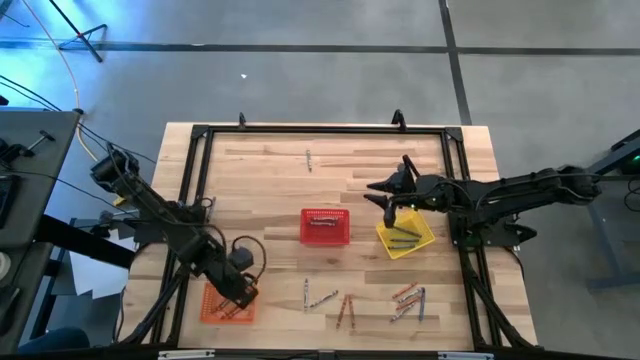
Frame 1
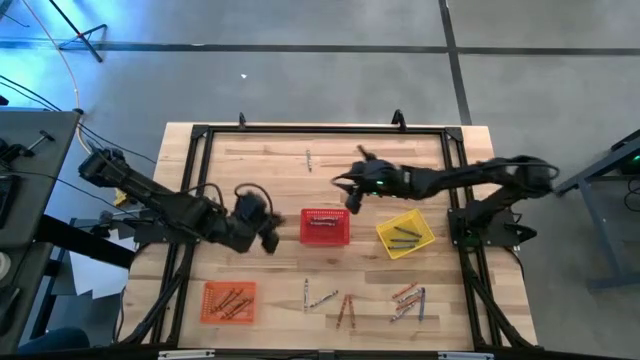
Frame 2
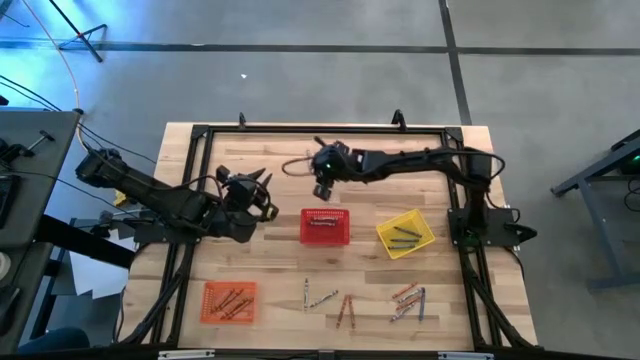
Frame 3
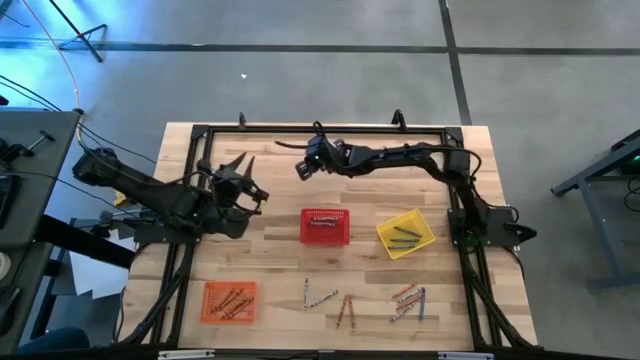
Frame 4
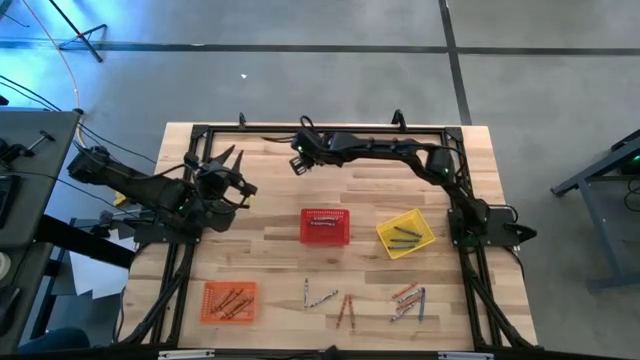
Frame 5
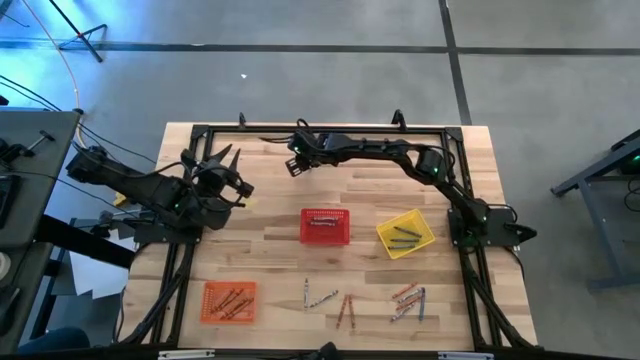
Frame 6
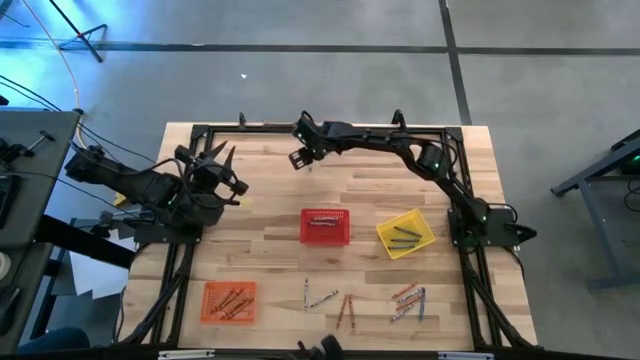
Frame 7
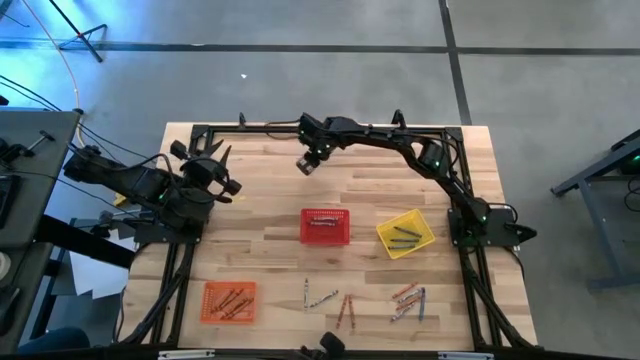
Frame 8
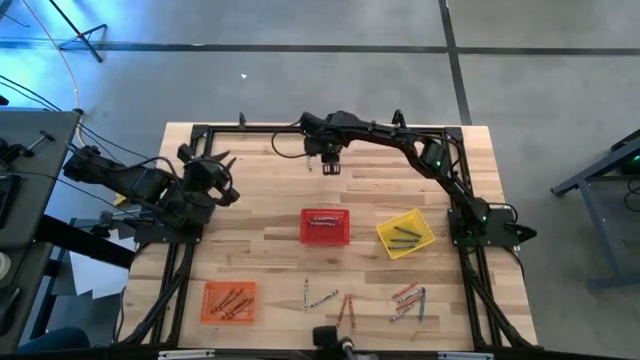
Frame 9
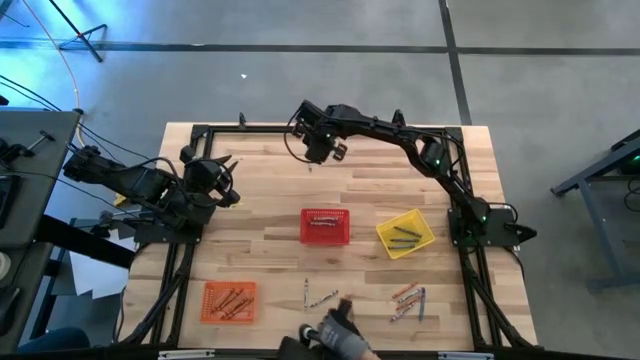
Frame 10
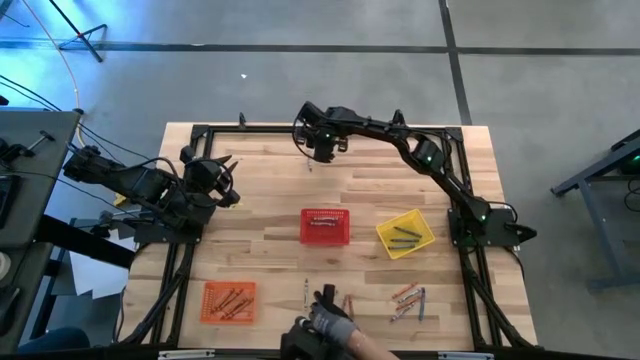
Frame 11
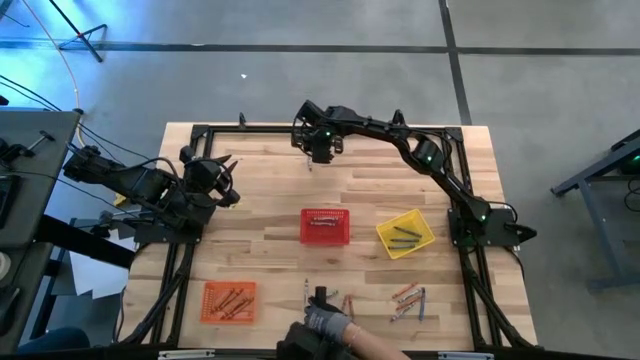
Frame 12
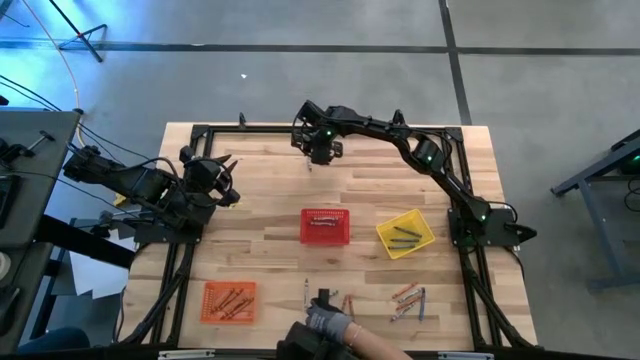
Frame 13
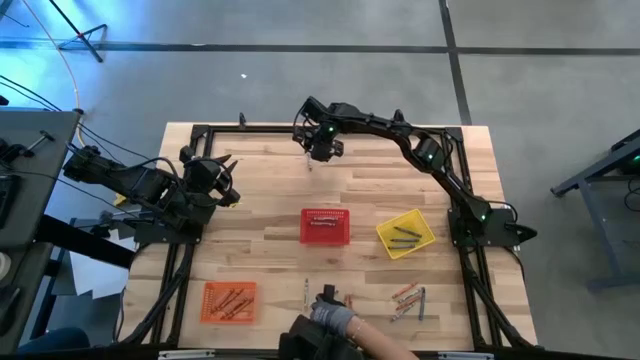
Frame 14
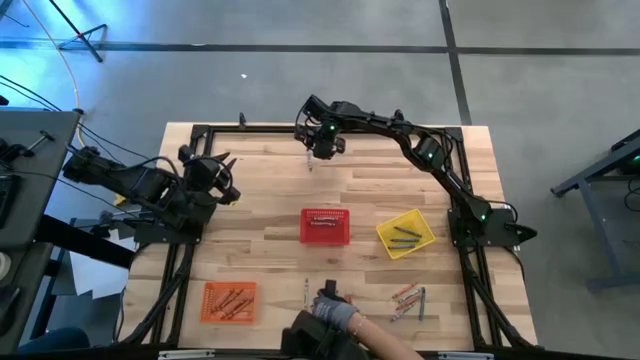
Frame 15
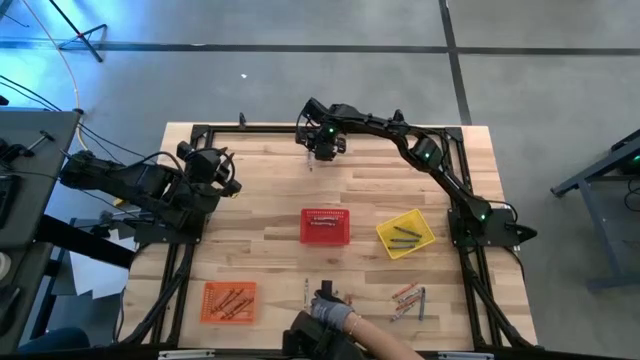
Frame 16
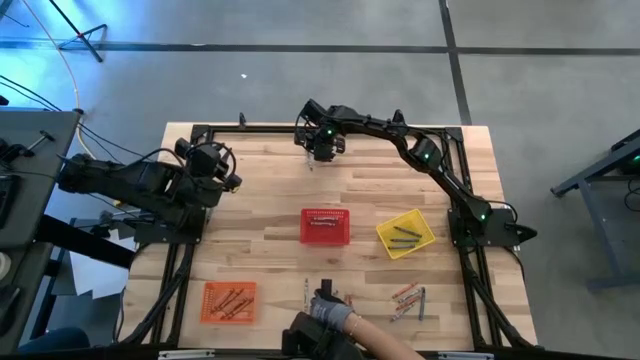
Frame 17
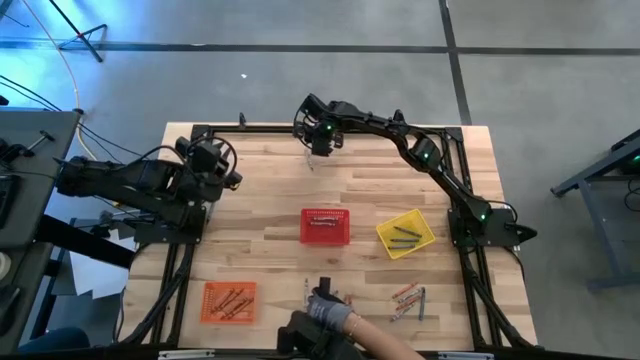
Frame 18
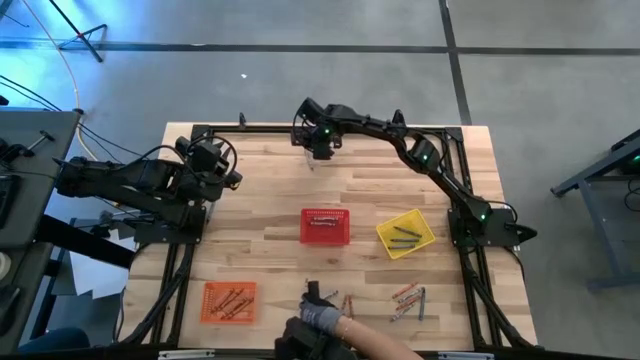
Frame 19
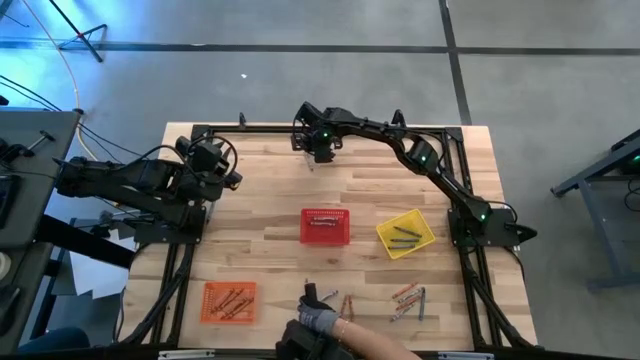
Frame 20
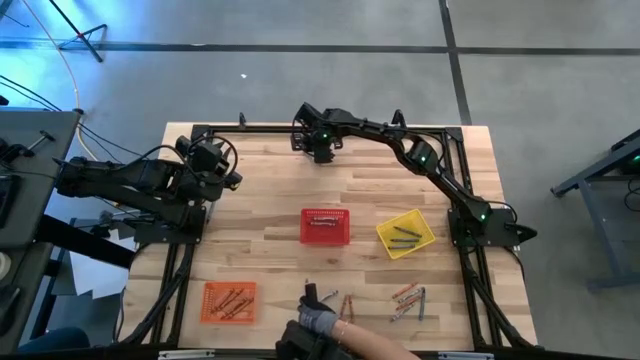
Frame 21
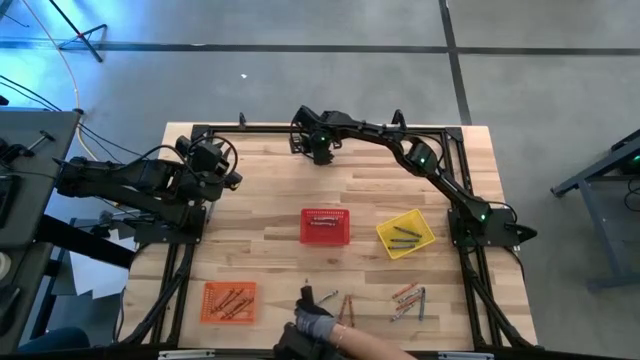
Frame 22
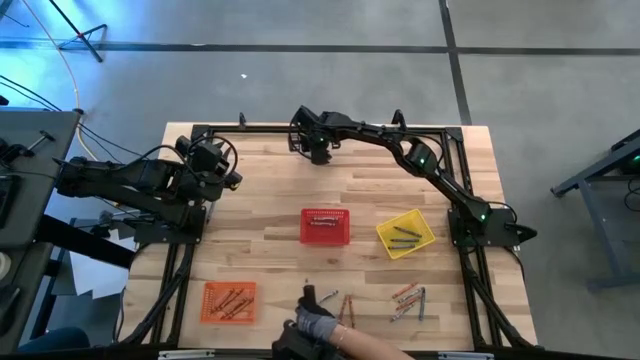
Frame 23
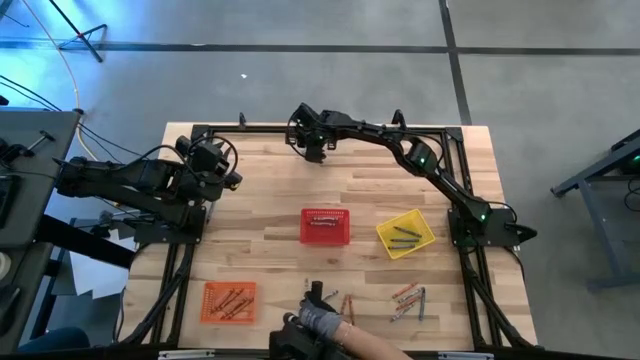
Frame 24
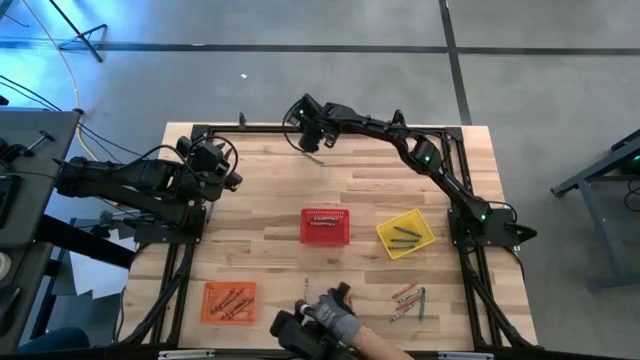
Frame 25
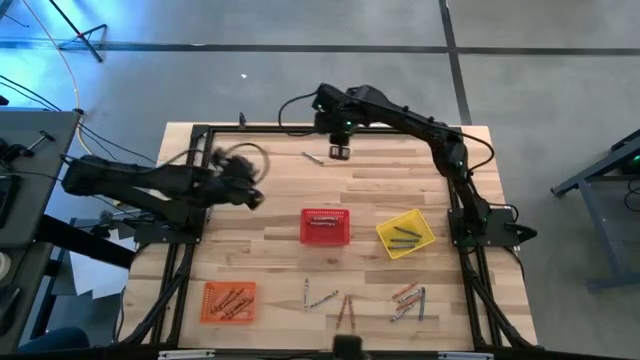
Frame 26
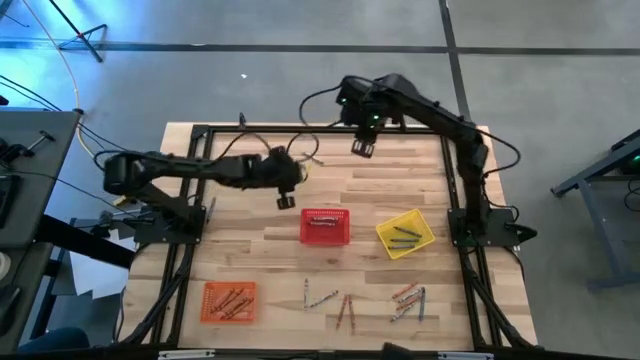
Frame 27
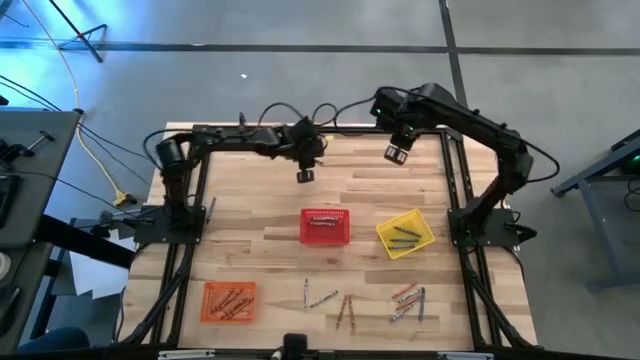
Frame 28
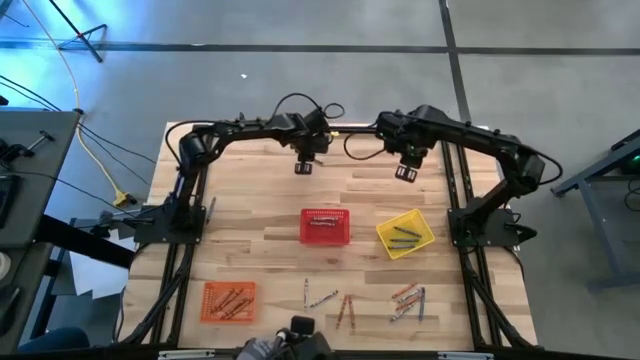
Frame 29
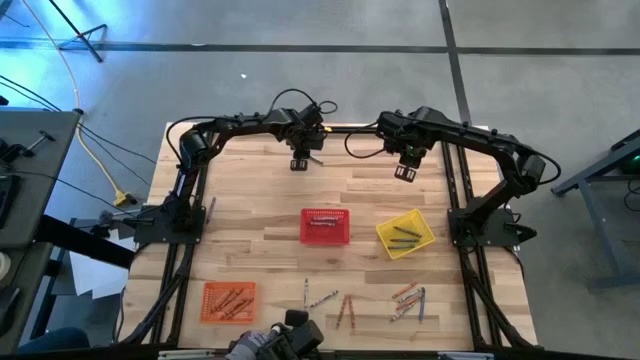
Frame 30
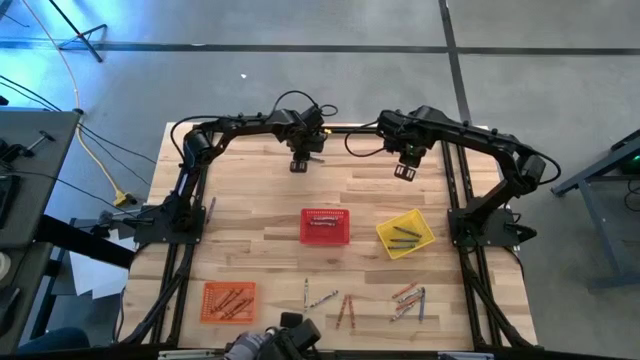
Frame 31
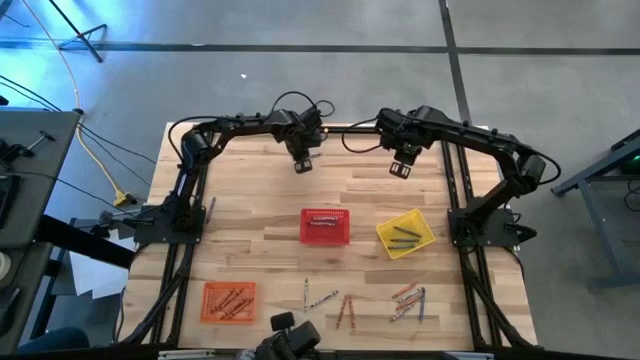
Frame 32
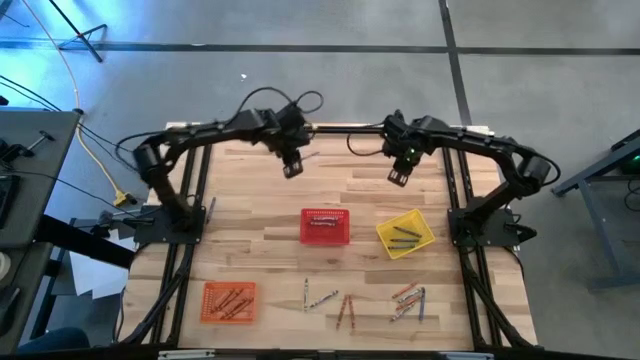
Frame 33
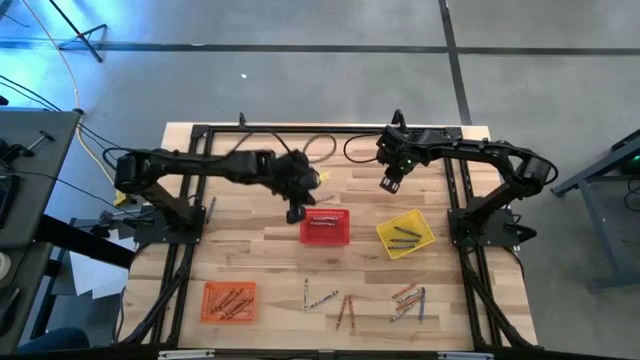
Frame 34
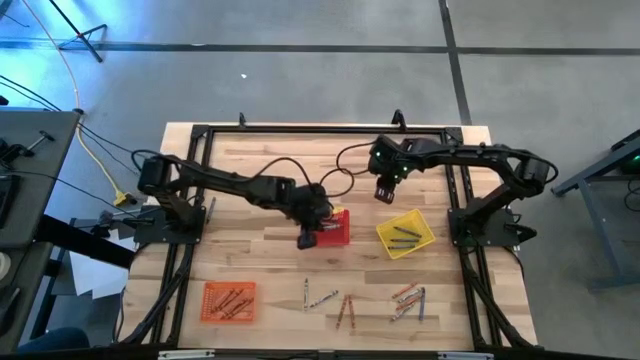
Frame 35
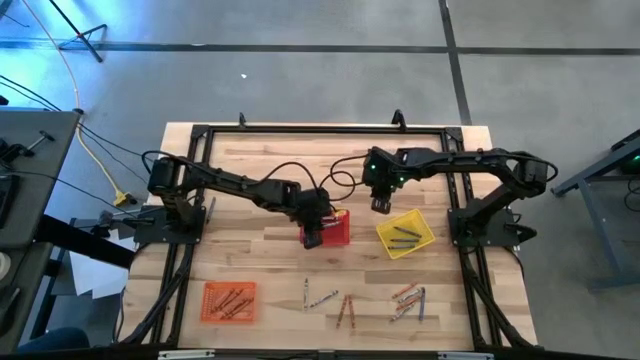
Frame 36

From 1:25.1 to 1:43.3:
Task: Sort crayons
Put the gray crayon into the red bin

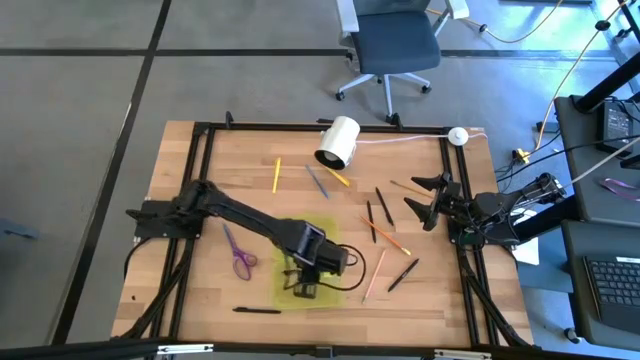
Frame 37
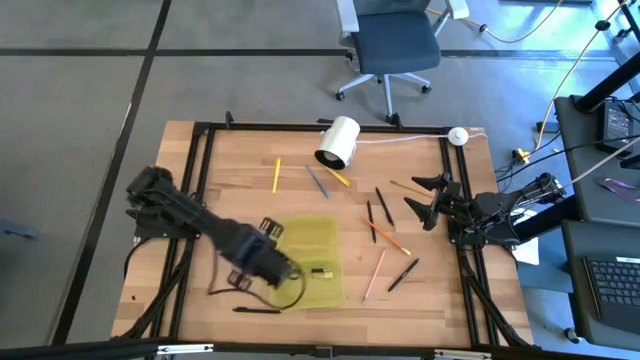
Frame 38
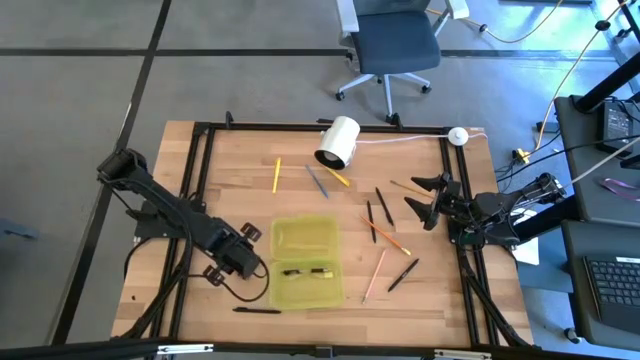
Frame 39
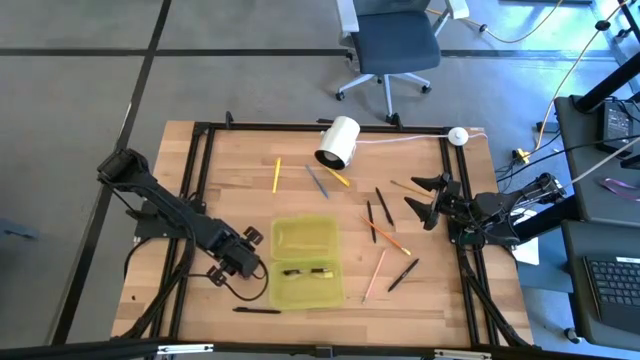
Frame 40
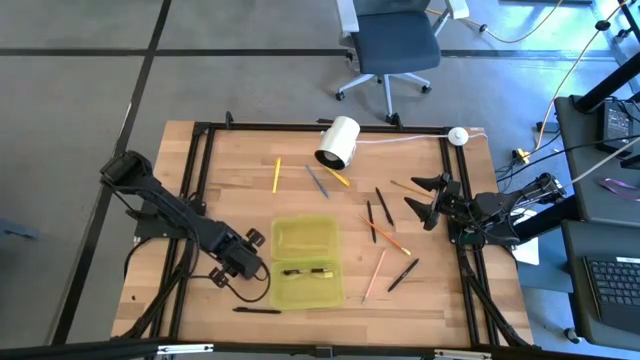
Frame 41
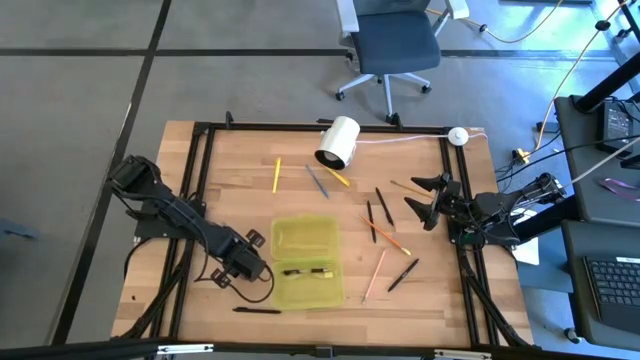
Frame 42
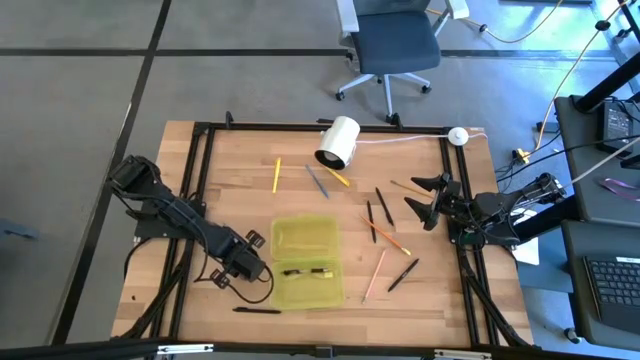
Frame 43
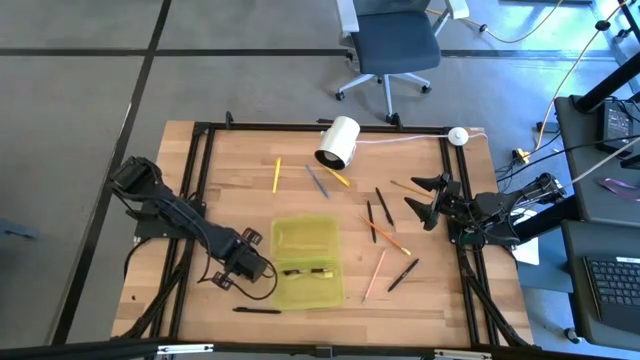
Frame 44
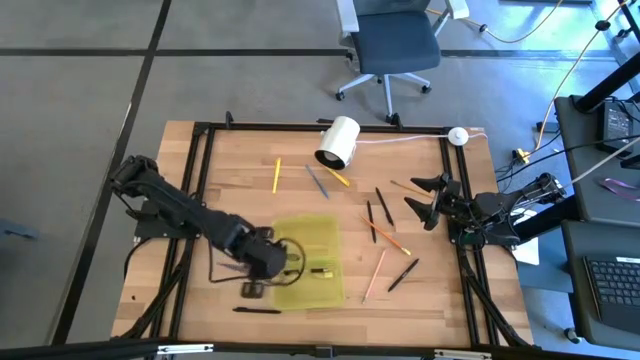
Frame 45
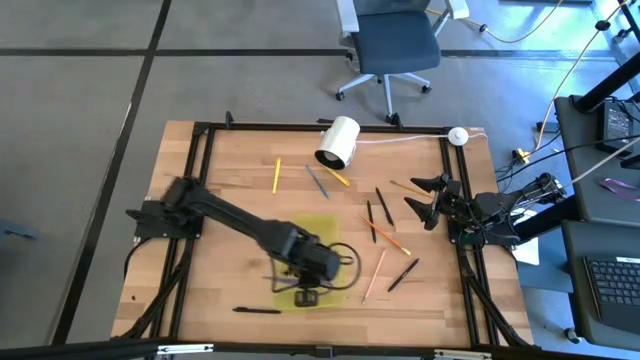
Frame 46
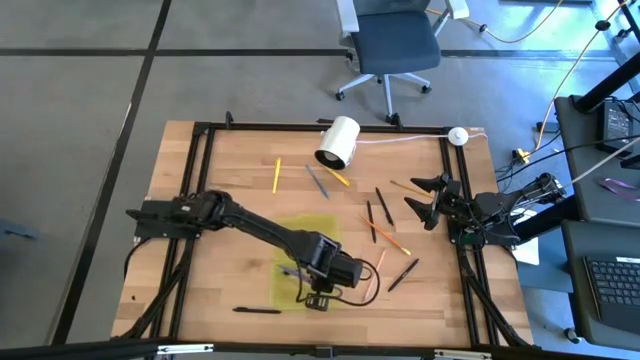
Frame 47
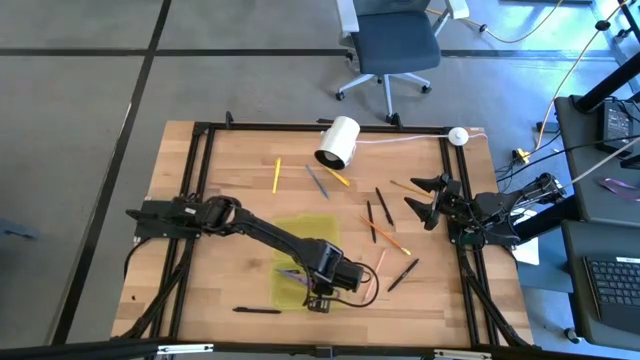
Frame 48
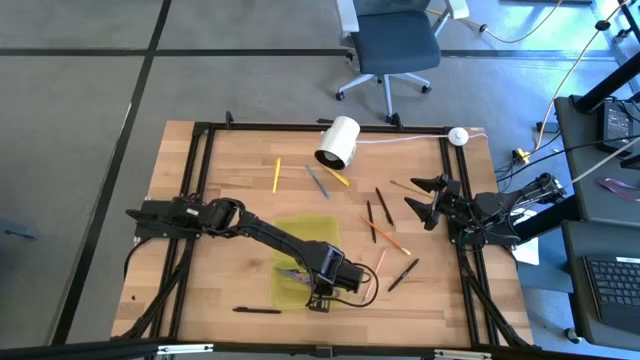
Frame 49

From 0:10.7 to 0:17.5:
Task: Pick & place school supplies into a supply box
Put the purple scissors into the yellow supply box
